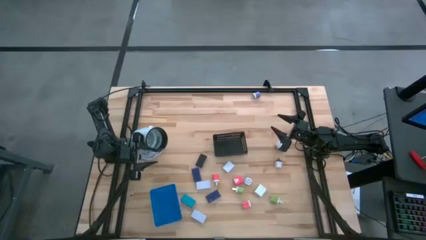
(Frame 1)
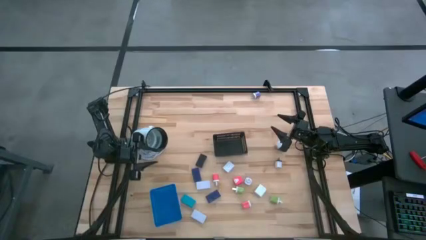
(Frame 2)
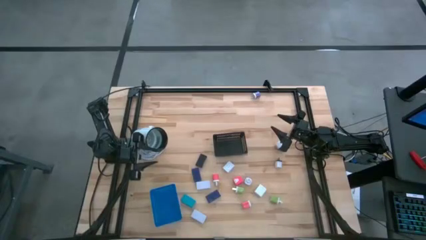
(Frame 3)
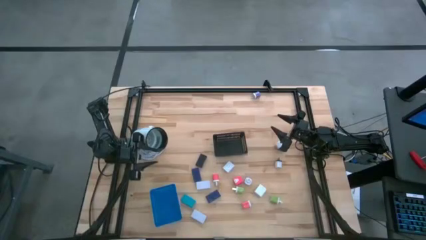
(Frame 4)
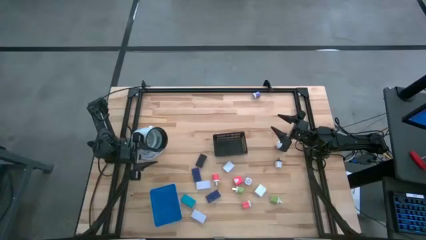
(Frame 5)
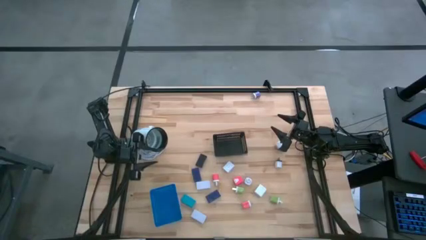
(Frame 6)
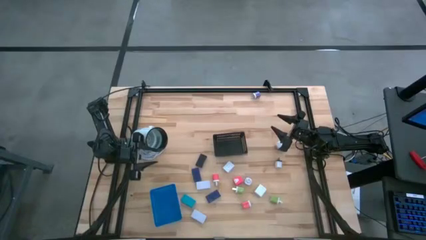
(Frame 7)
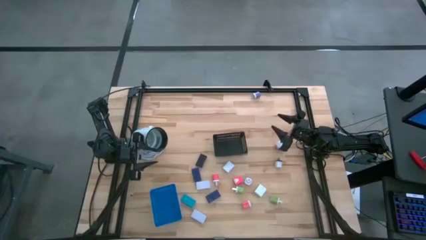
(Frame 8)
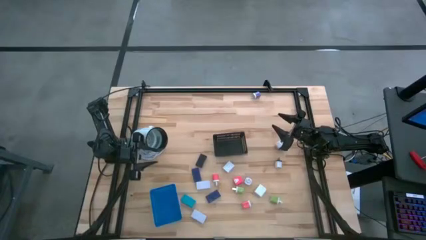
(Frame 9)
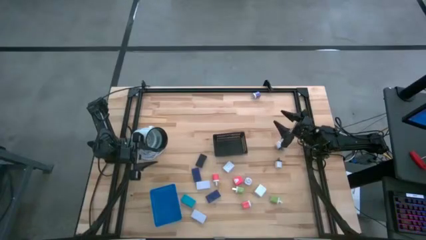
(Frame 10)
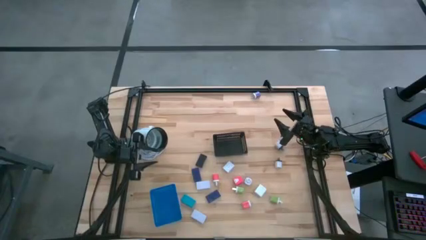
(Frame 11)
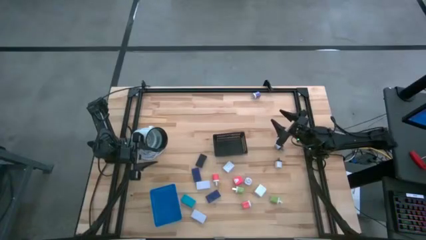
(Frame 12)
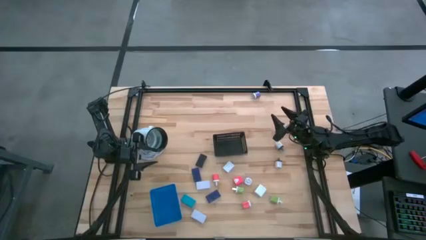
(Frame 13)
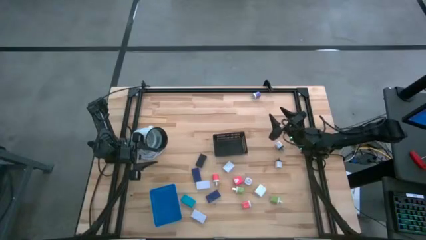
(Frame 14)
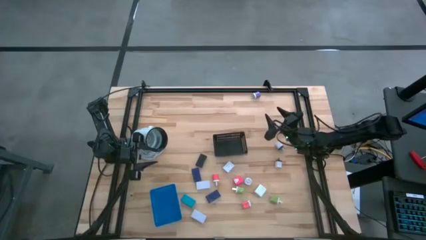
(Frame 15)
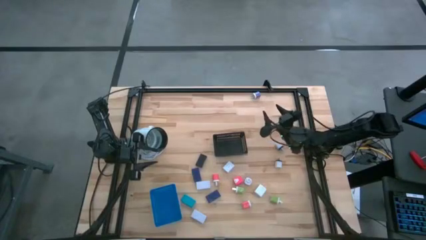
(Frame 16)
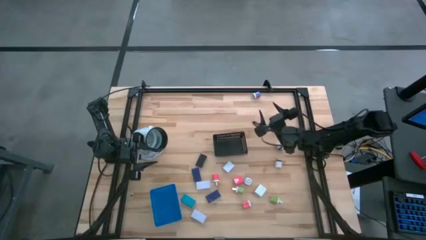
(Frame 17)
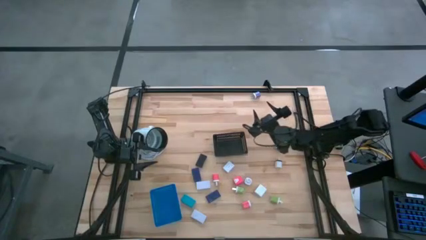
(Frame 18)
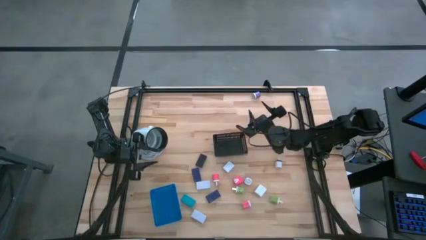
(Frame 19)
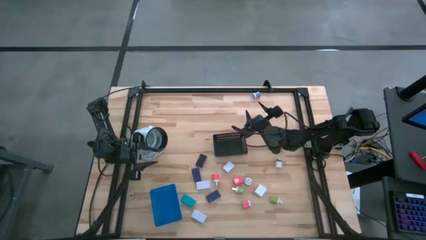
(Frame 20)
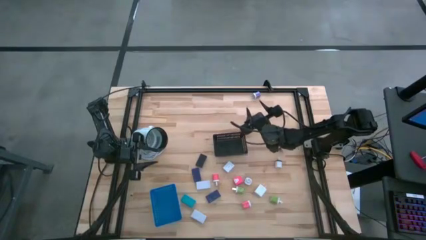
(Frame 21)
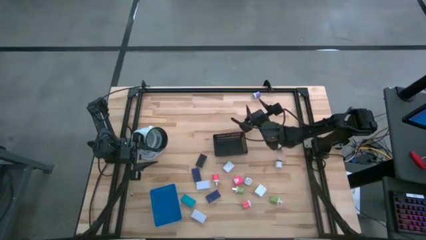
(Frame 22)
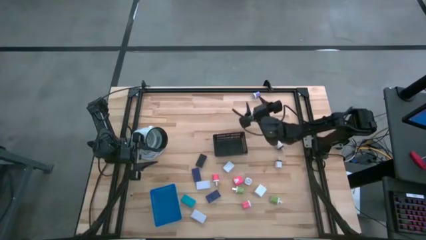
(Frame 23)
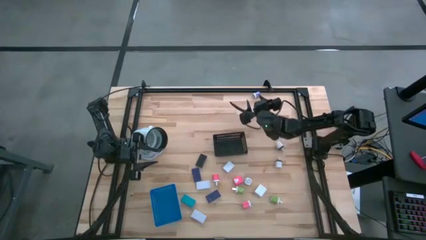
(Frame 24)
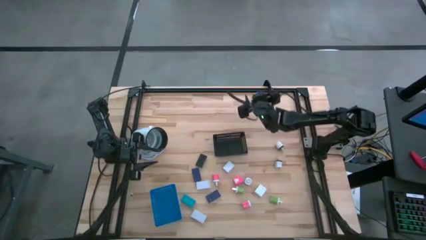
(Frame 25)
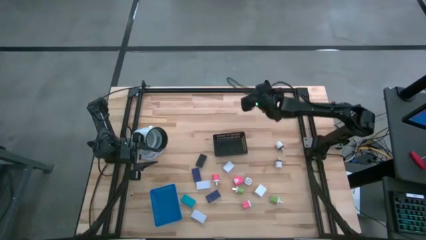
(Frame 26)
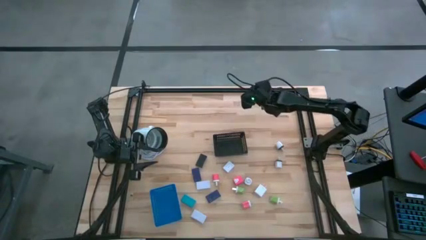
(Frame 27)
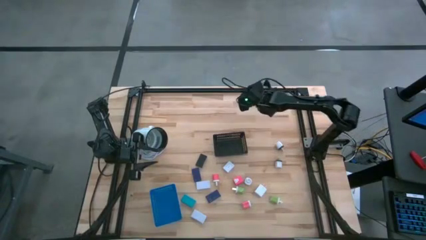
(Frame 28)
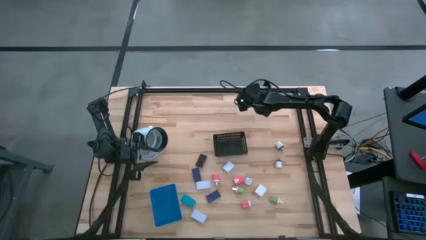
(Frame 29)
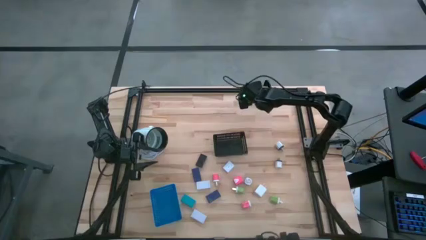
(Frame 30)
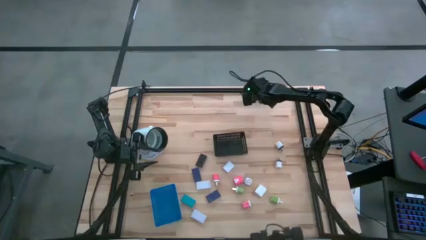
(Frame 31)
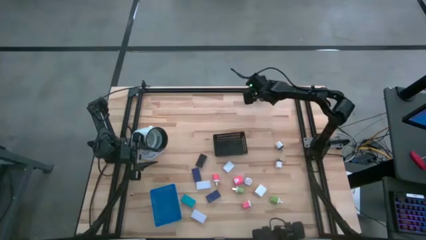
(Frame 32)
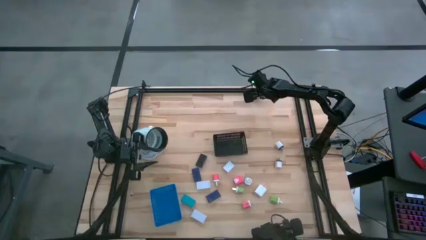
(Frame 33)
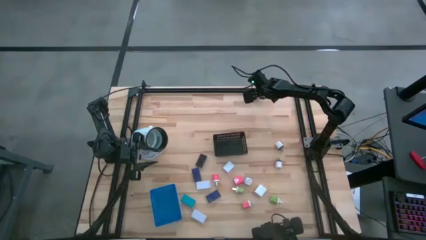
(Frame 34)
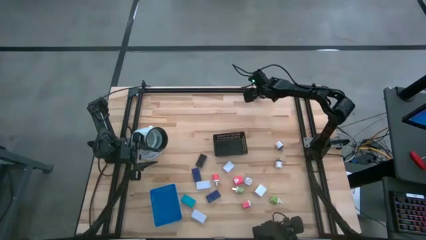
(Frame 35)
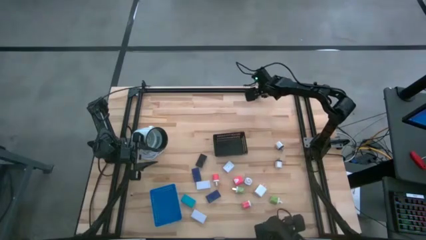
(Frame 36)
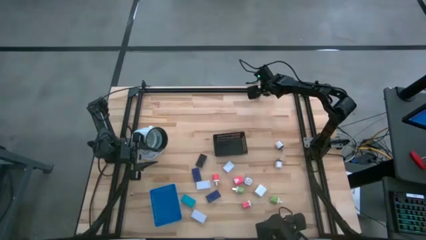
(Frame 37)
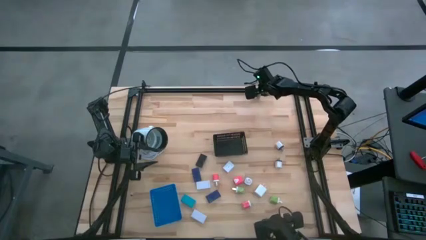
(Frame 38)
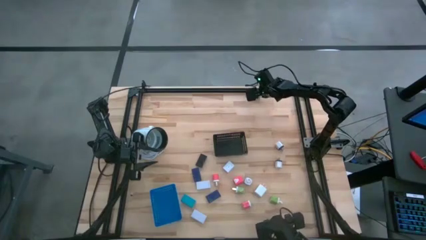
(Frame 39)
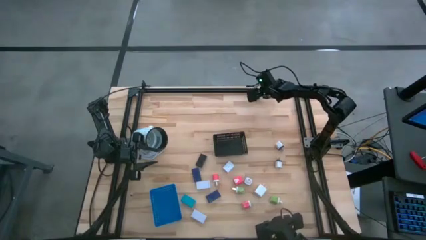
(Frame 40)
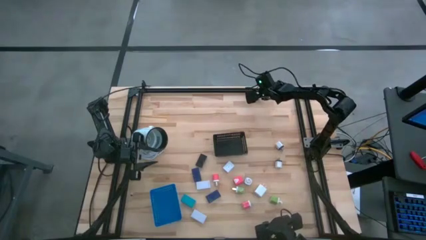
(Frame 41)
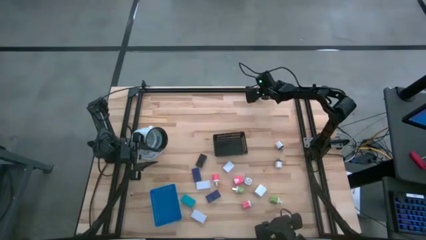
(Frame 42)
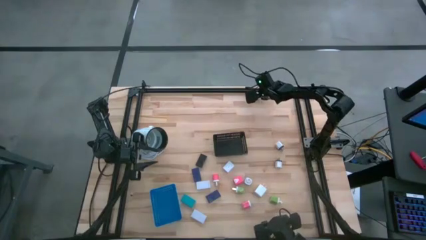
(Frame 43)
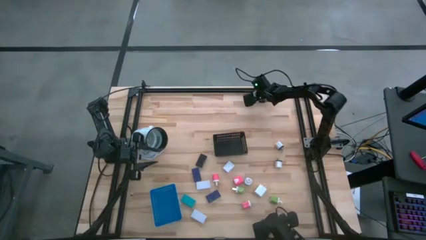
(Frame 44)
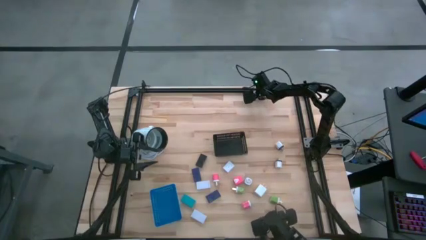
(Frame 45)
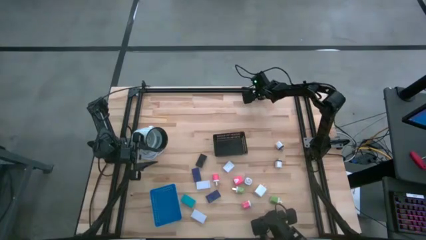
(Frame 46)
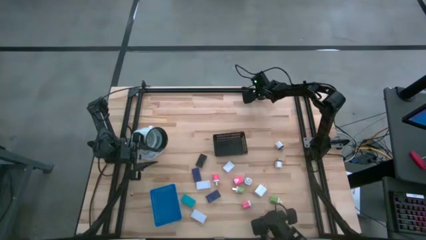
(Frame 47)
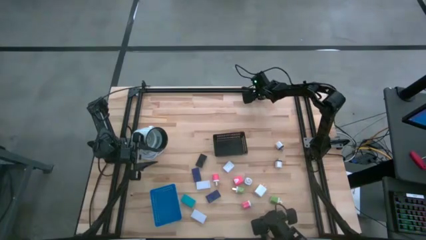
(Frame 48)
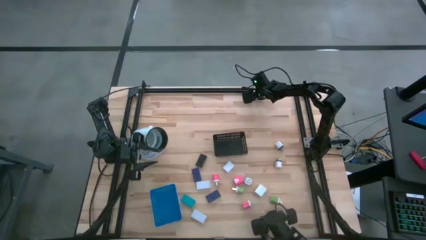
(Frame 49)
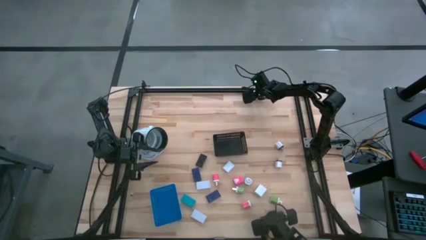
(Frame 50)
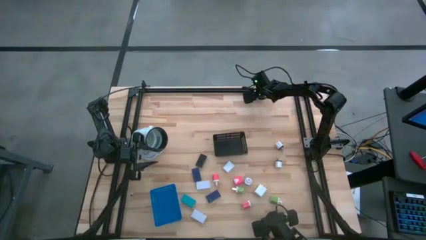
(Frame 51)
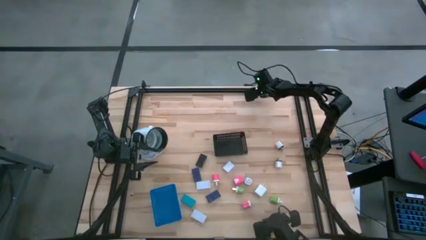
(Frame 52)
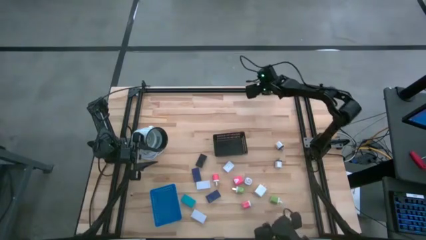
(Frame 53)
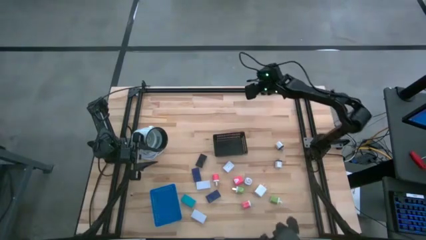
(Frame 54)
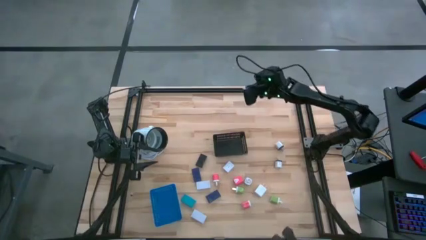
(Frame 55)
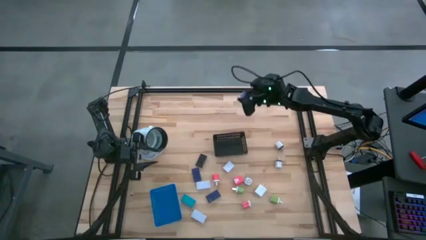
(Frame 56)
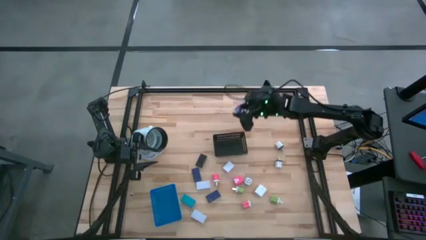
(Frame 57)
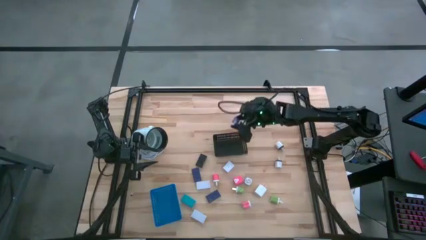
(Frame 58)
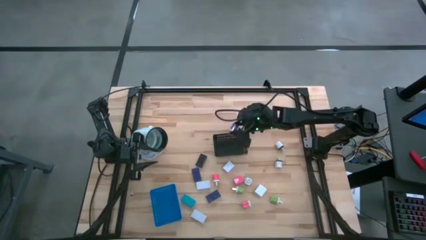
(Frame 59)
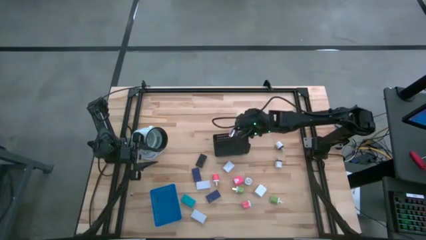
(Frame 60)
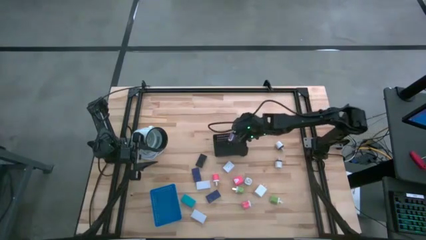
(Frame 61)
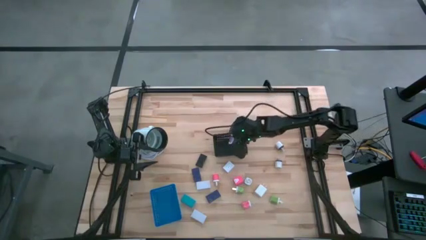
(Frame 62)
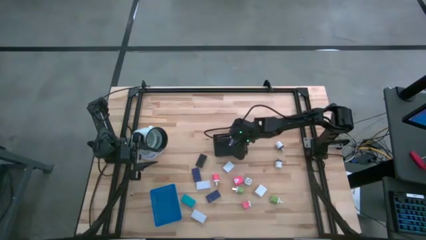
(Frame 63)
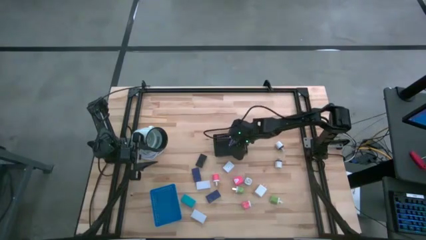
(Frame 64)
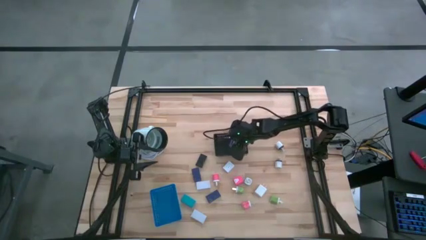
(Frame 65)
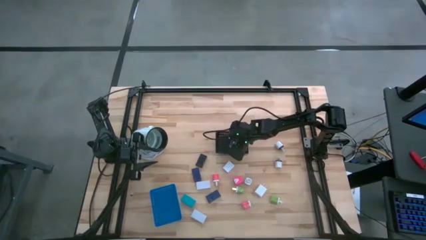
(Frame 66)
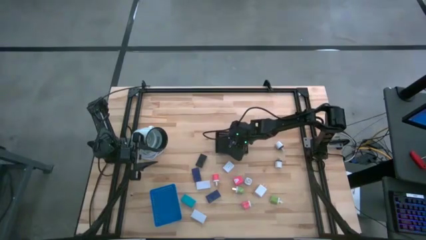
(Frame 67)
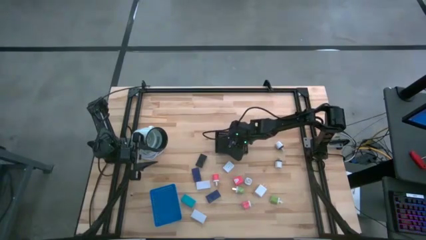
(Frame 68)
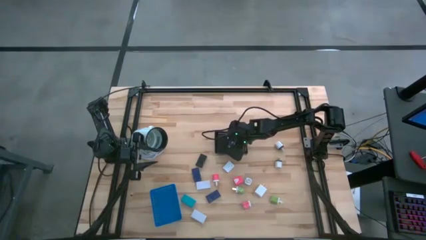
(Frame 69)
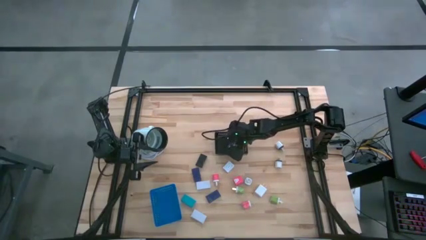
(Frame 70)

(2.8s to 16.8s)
Task: Pick & Place Office items
Put the purple charger adapter into the black bin

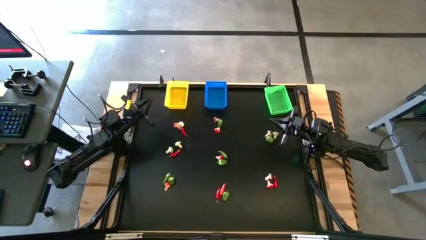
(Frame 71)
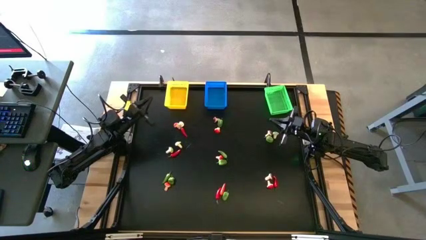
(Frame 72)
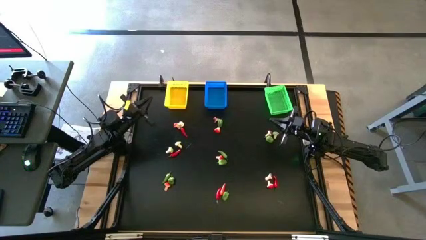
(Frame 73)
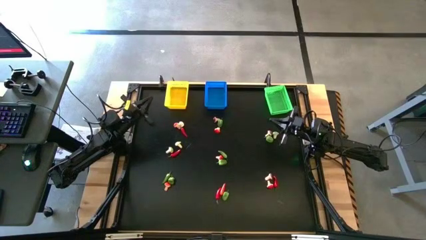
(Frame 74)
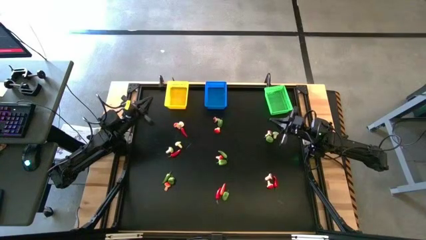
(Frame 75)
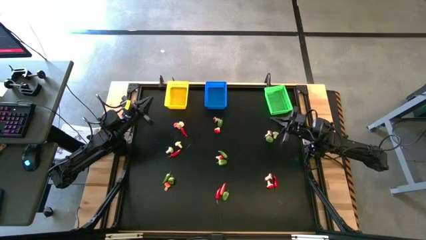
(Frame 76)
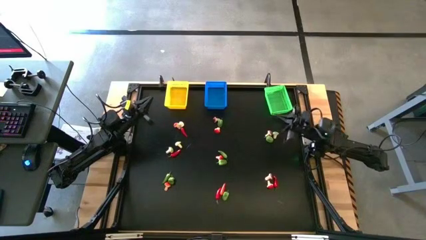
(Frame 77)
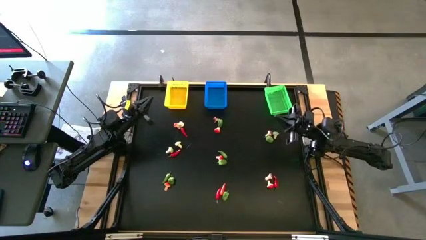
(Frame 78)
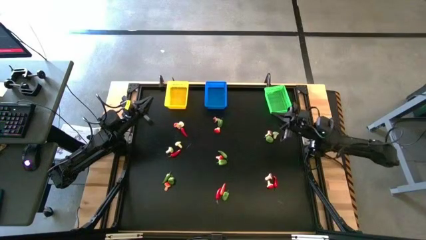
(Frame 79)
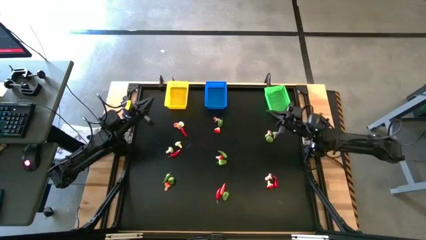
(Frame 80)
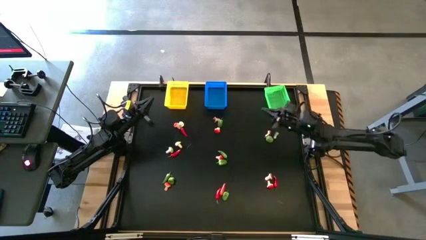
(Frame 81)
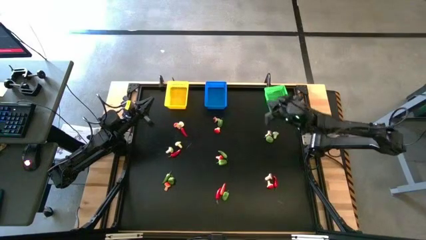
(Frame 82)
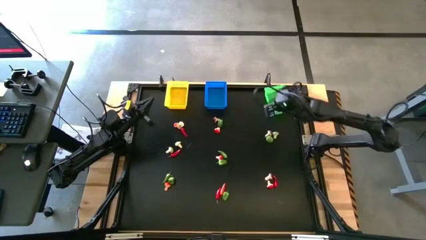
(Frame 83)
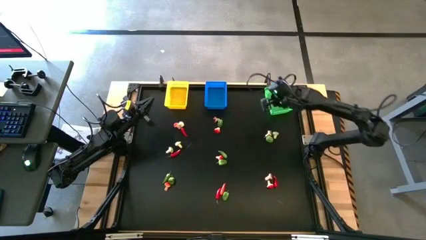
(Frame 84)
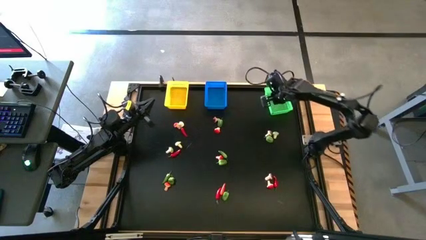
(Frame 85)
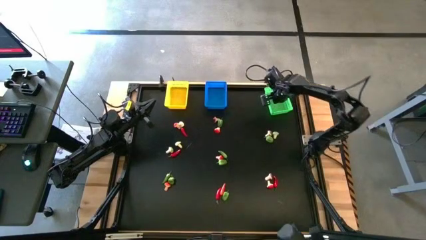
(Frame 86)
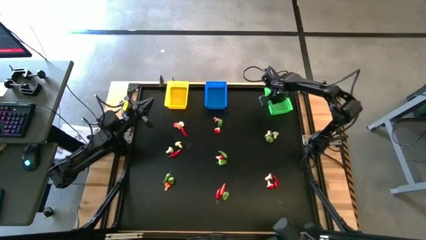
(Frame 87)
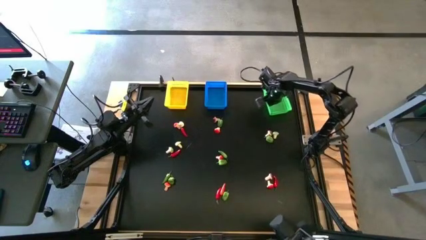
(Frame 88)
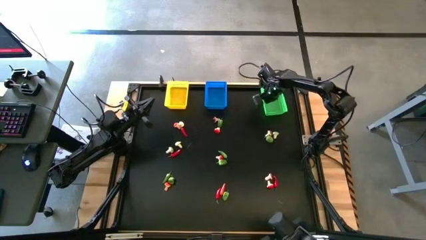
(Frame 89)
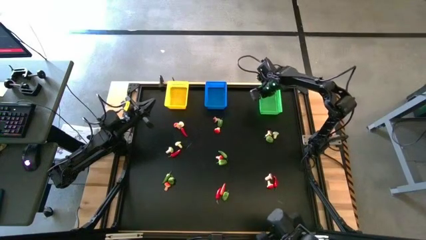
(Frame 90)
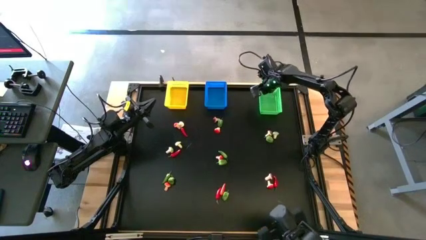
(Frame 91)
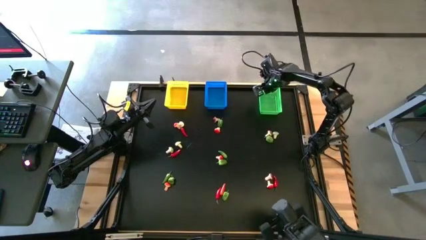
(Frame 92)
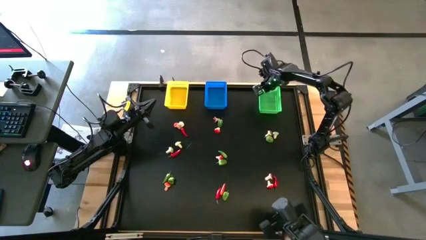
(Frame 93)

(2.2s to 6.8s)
Task: Sort produce into baskets
Adjust the green bin
